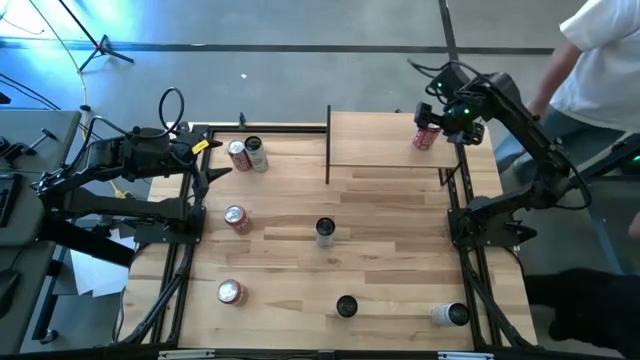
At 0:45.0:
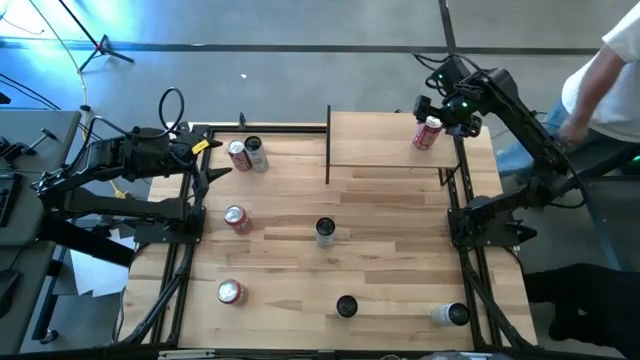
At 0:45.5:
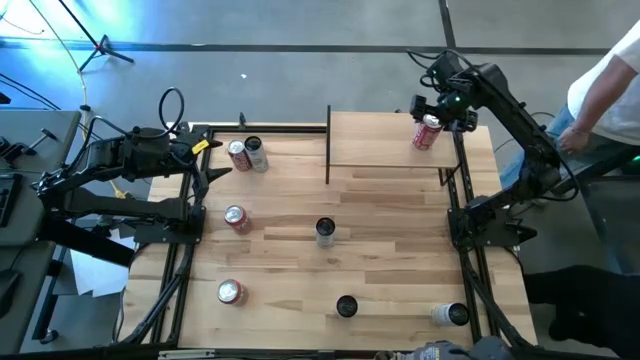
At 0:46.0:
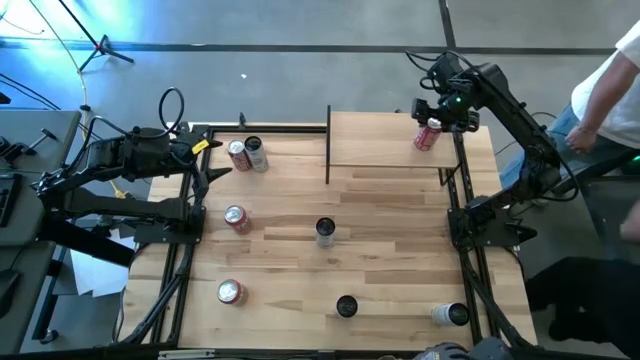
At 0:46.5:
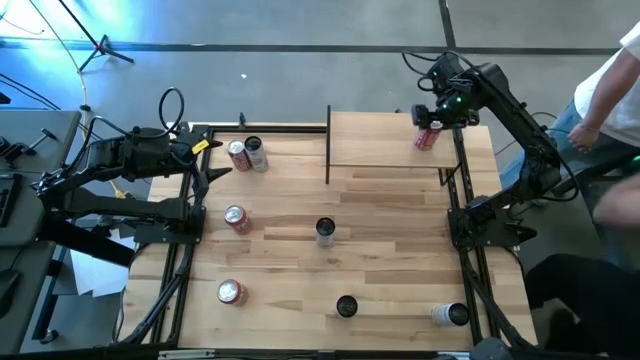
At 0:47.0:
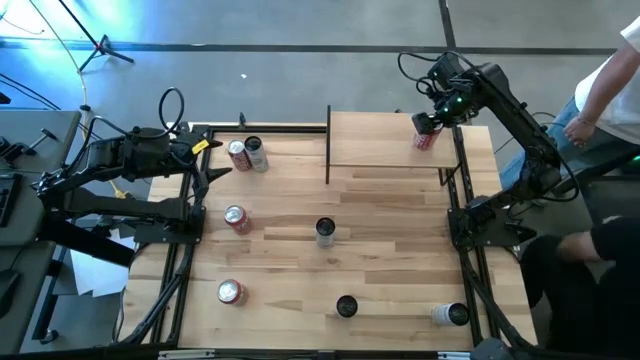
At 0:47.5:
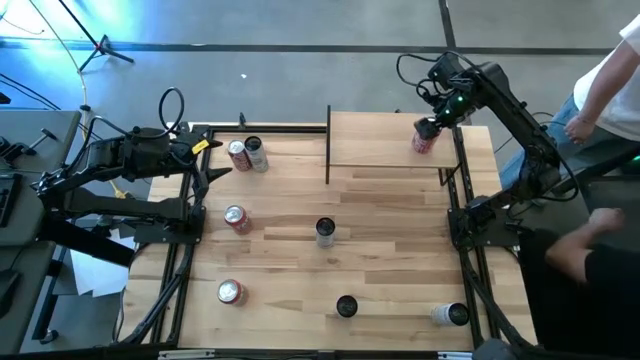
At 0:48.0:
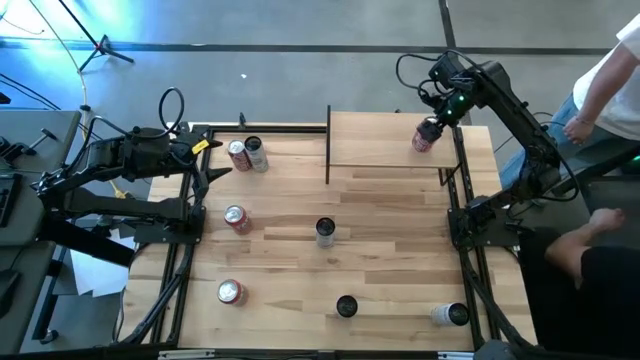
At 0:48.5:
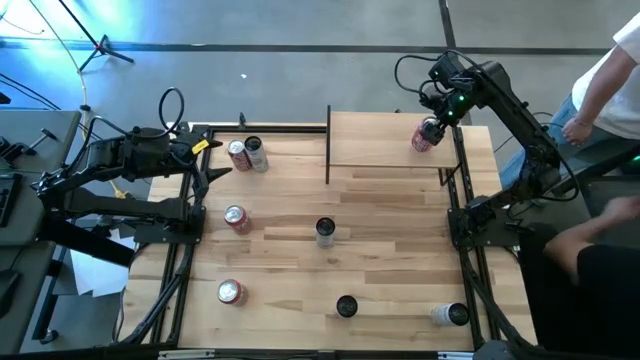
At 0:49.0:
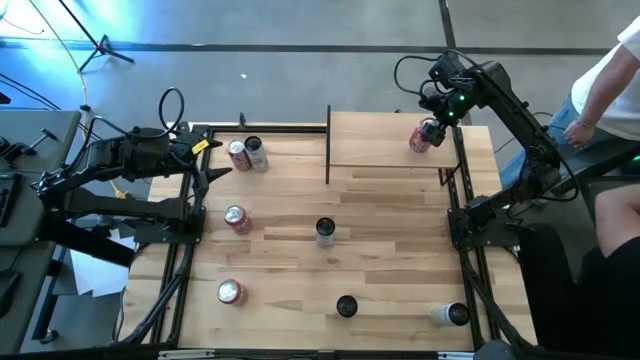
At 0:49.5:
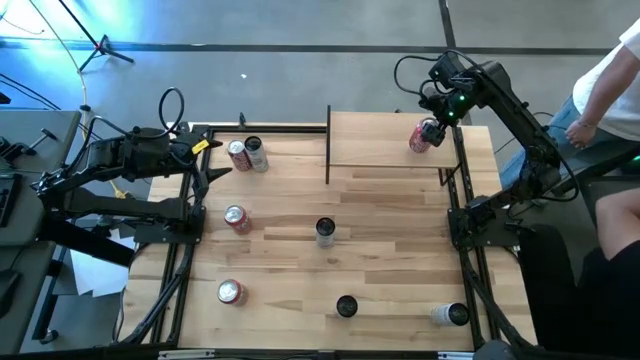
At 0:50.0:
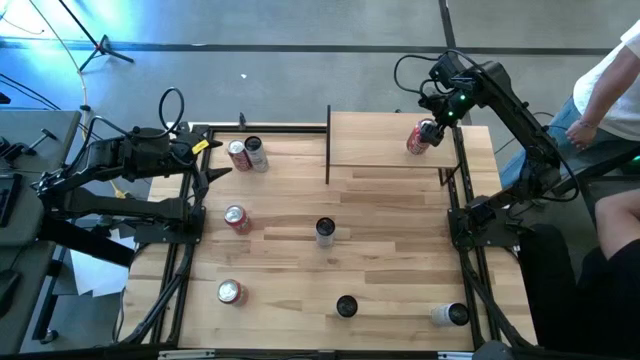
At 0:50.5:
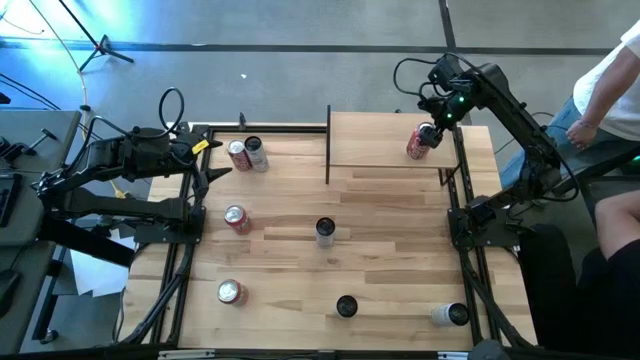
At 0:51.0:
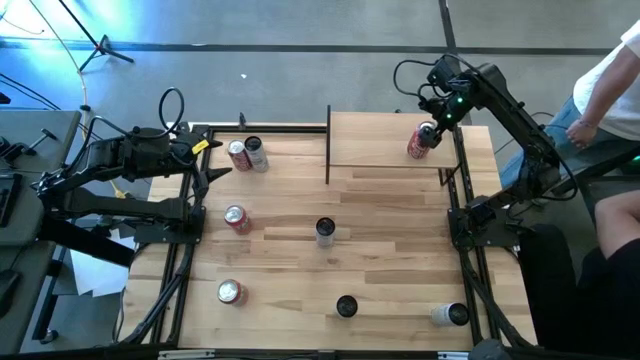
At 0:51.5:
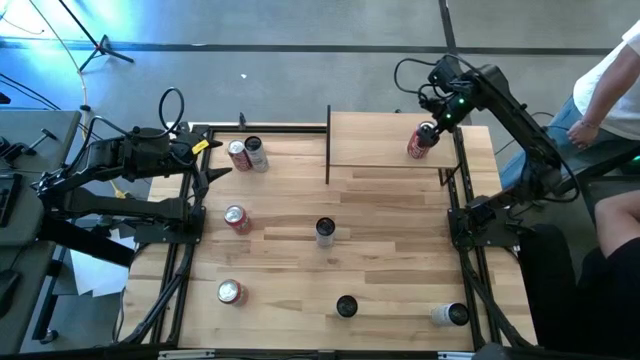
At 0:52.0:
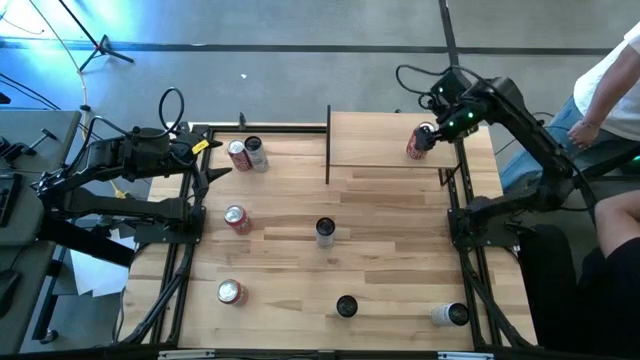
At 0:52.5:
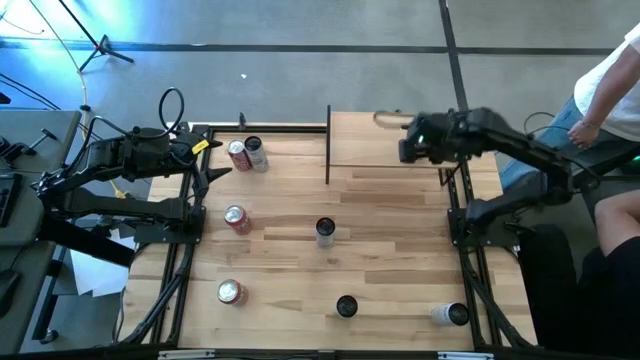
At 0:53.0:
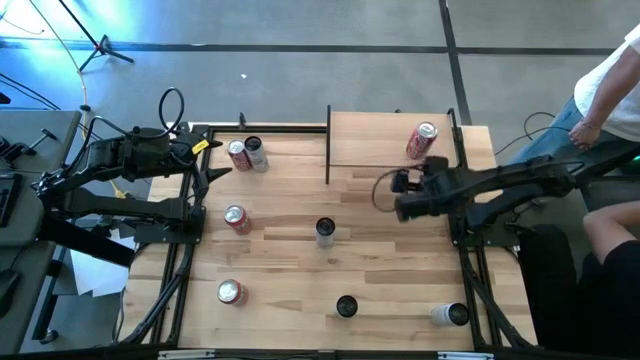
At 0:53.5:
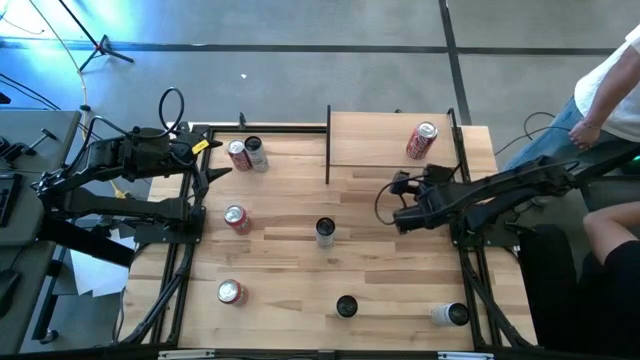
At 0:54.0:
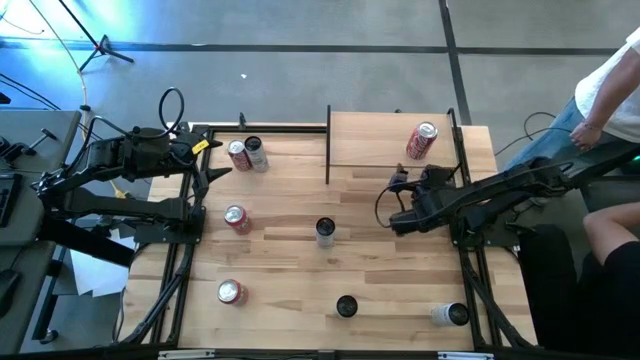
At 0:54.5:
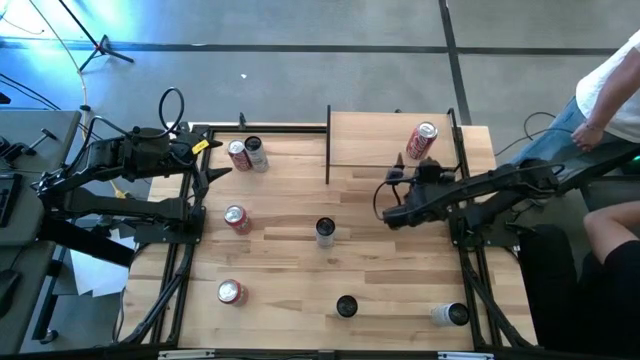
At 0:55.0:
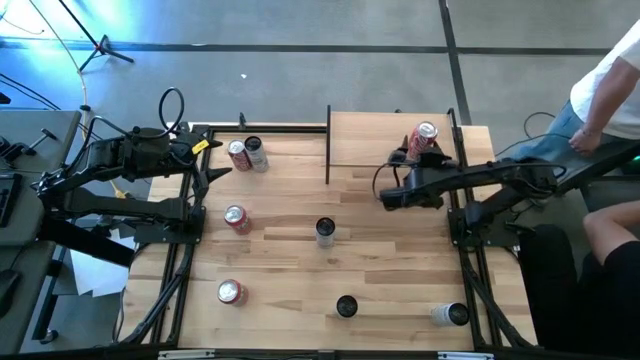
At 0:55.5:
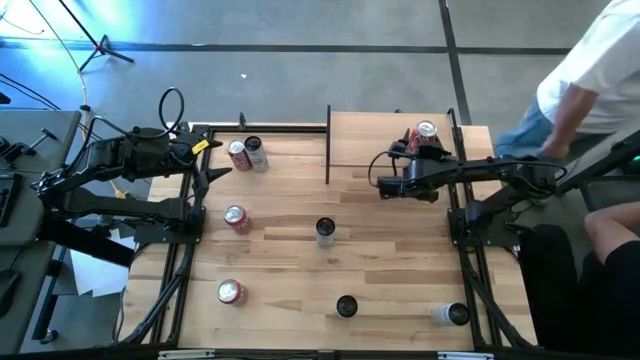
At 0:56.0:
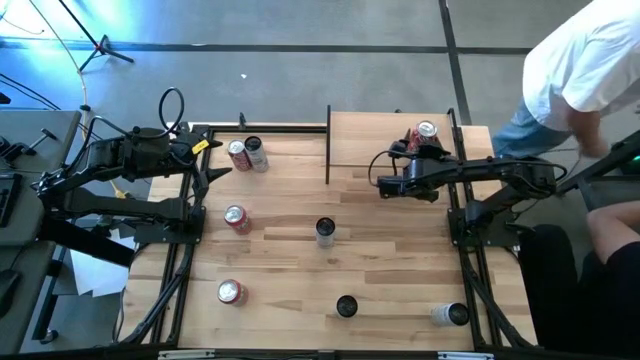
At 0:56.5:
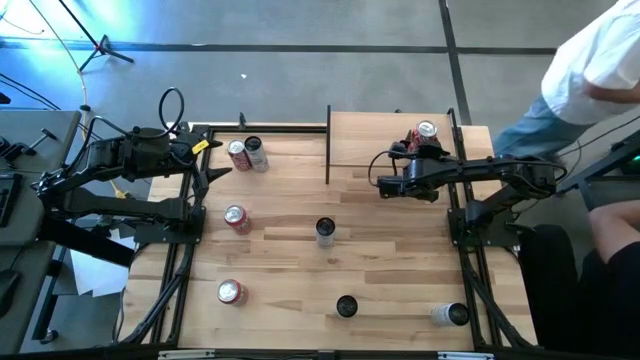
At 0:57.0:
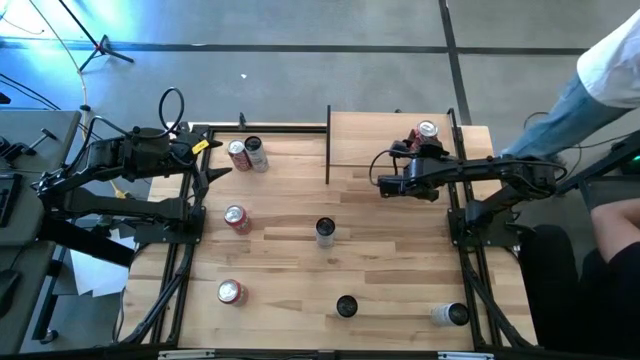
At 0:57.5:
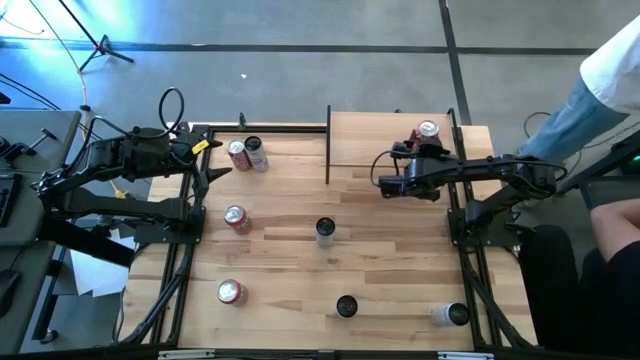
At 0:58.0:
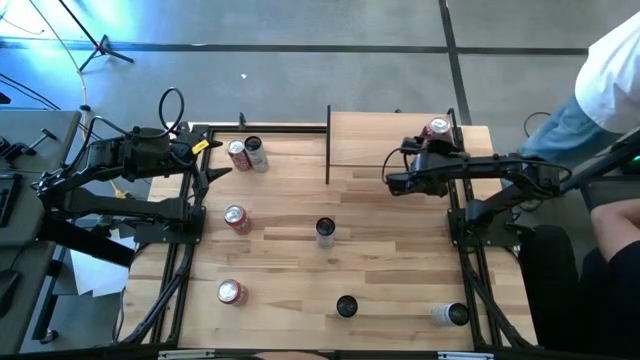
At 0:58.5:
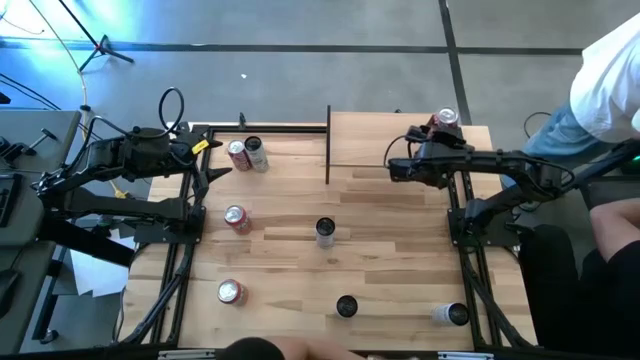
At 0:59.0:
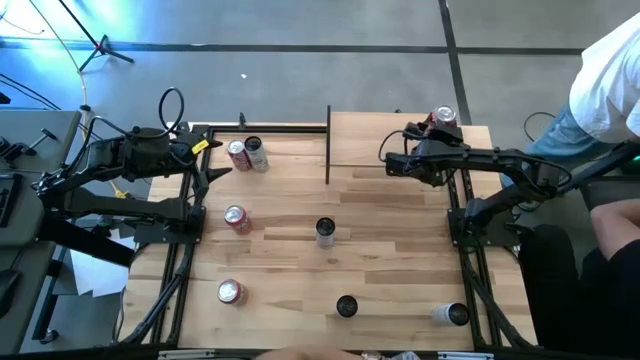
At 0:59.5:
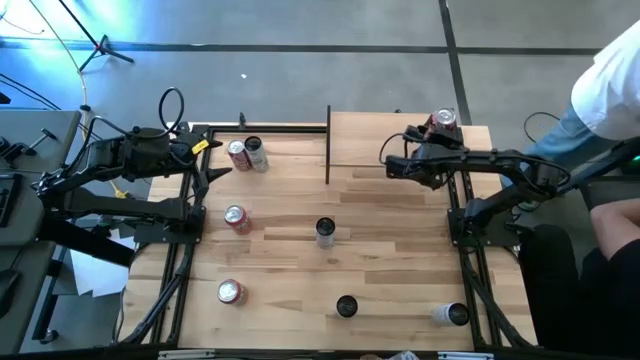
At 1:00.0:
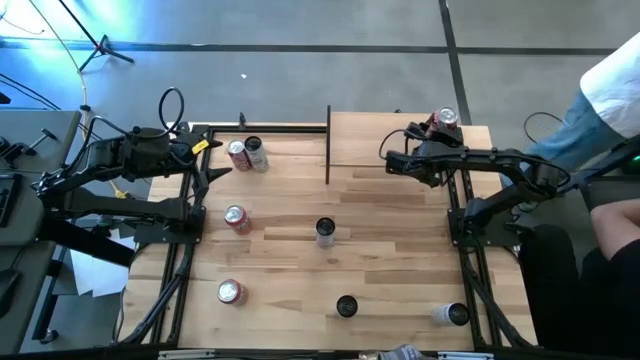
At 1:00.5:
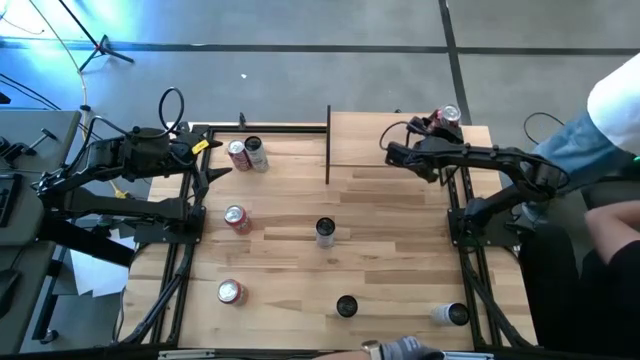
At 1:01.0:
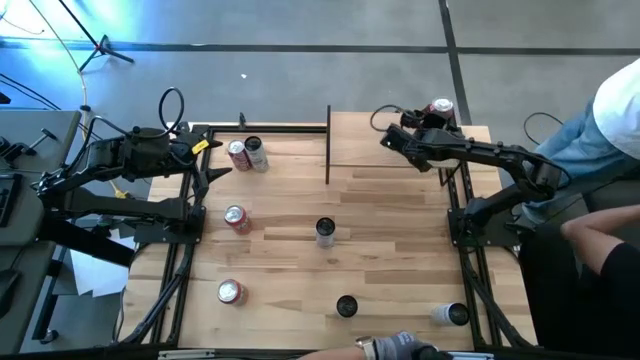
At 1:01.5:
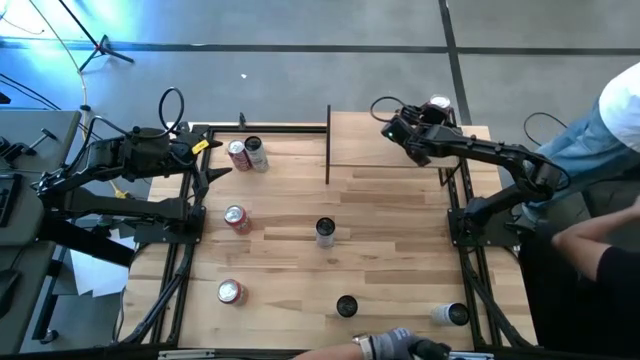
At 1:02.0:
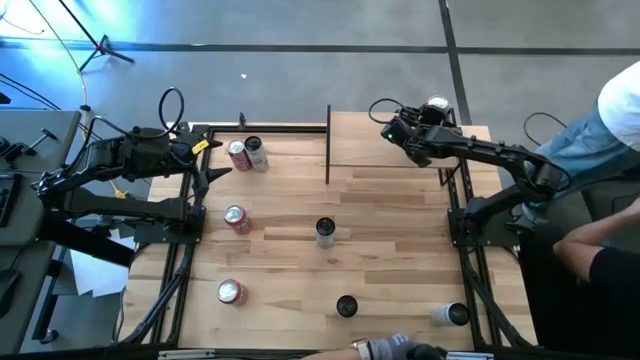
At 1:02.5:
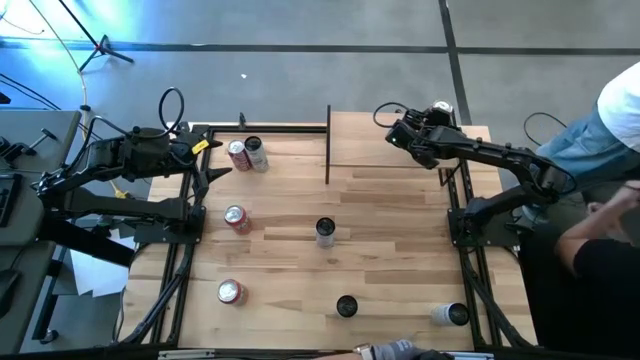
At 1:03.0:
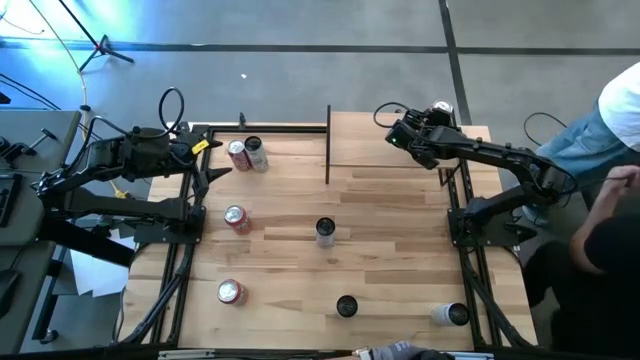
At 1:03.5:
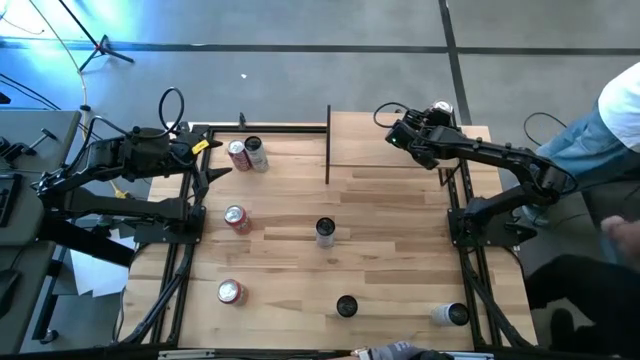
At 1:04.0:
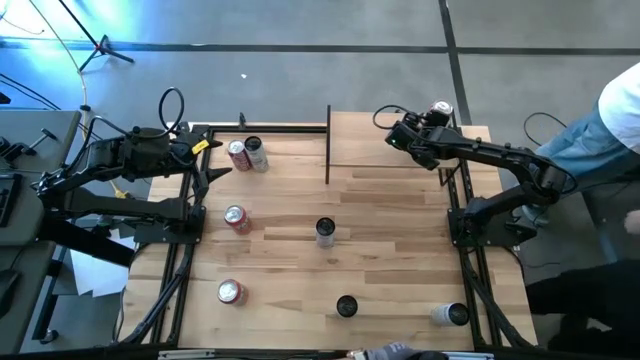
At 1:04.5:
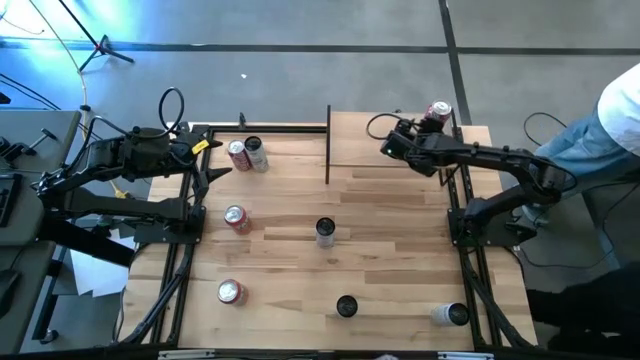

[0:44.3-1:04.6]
Task: Place canned beverage on shelf
Put the red soda can on the shelf

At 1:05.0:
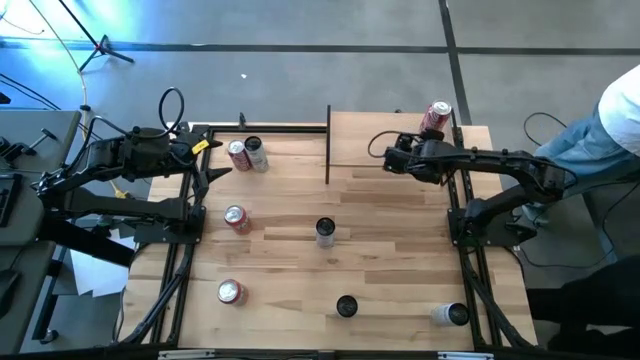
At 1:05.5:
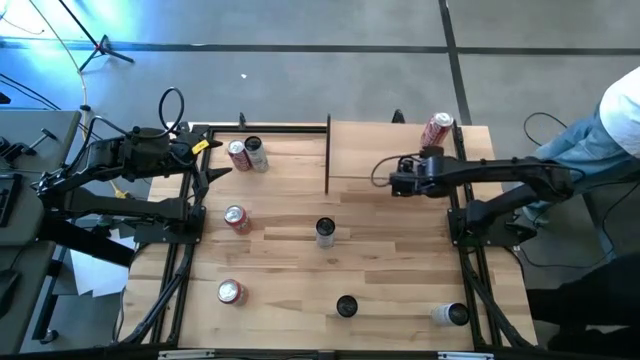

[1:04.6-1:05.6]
Adjust the shelf
